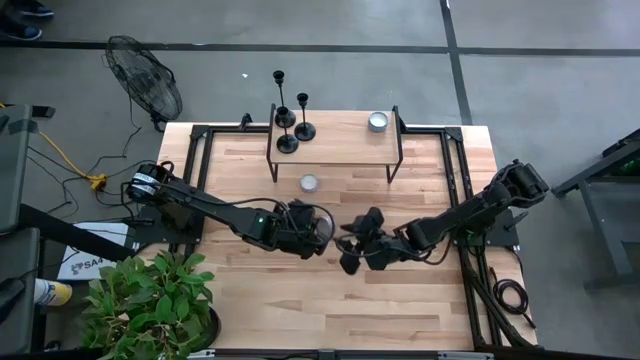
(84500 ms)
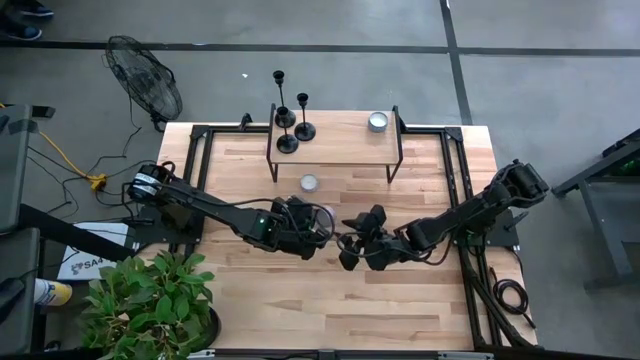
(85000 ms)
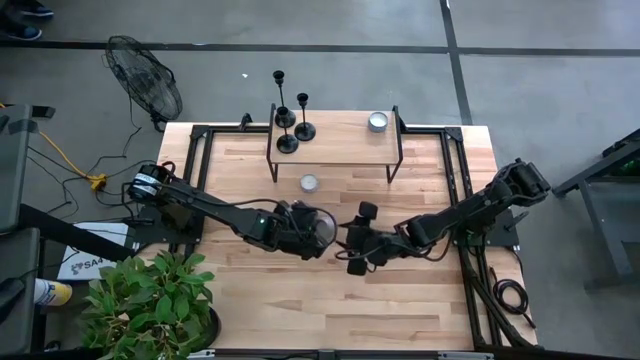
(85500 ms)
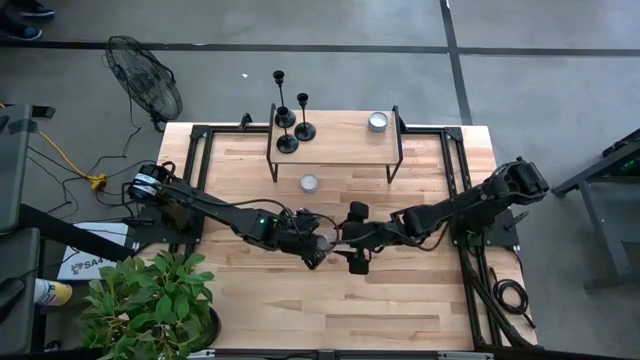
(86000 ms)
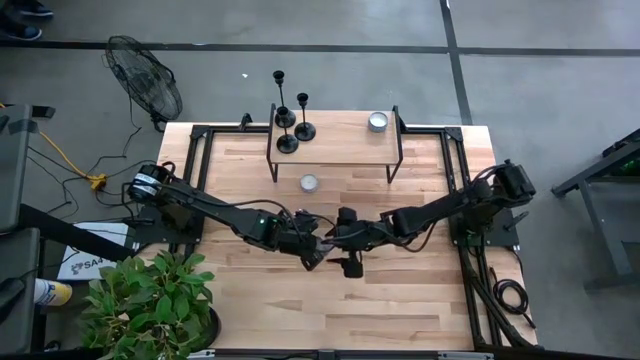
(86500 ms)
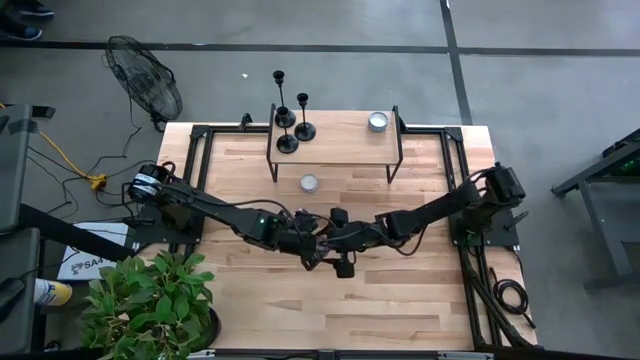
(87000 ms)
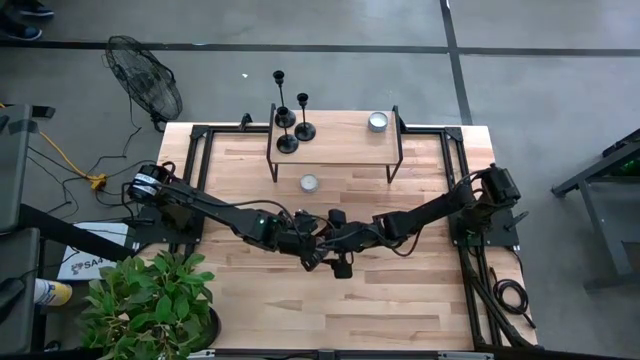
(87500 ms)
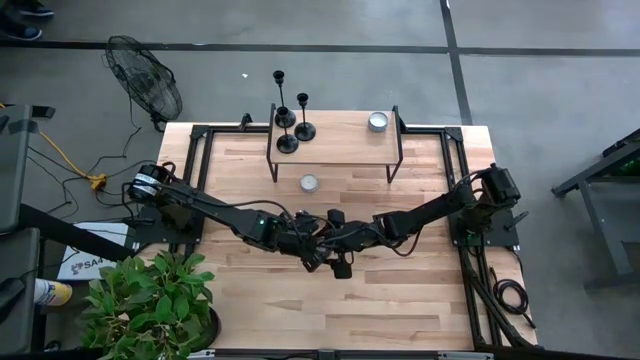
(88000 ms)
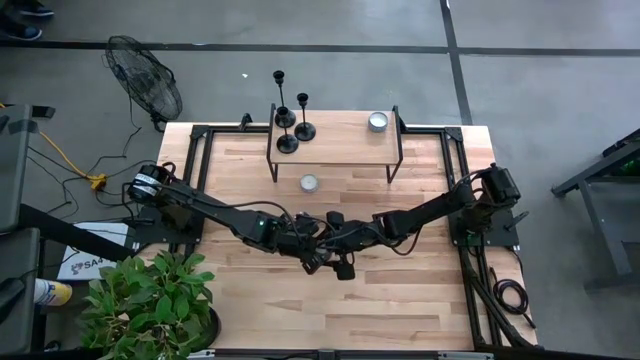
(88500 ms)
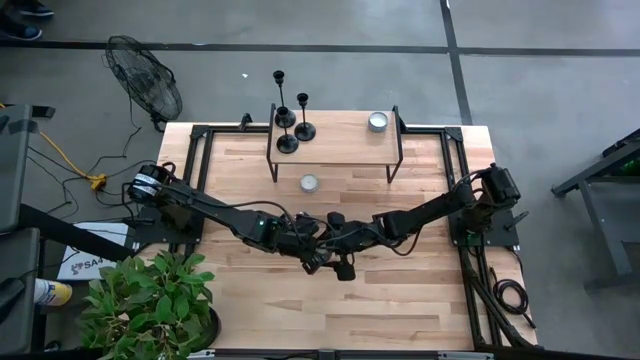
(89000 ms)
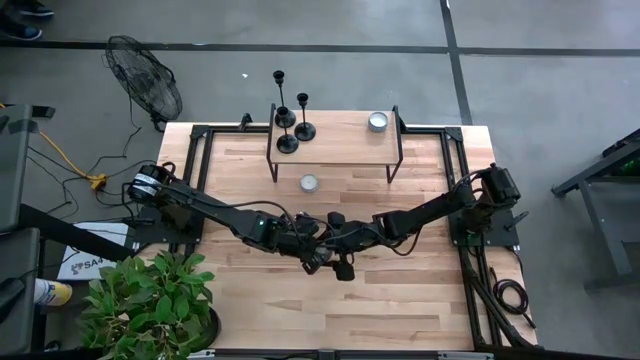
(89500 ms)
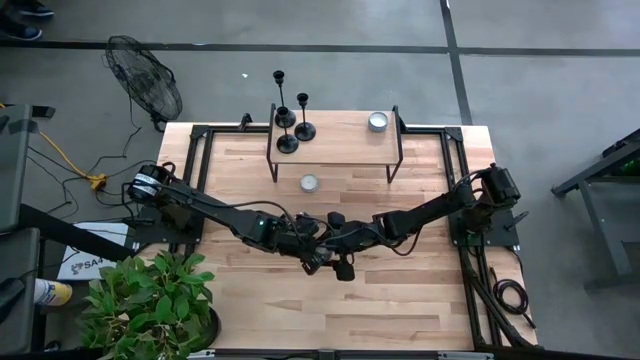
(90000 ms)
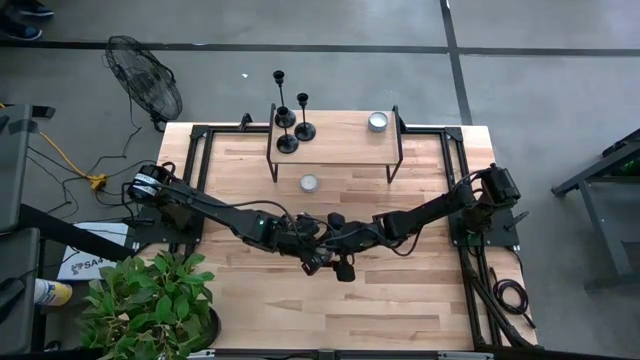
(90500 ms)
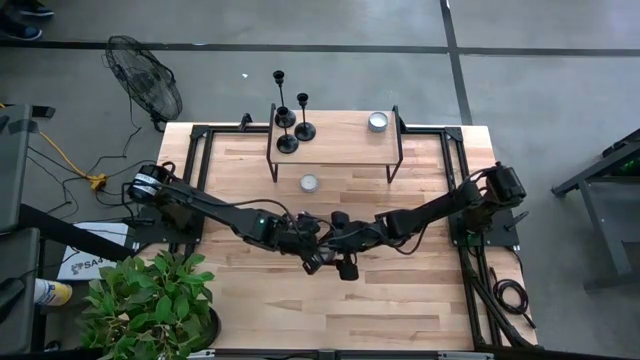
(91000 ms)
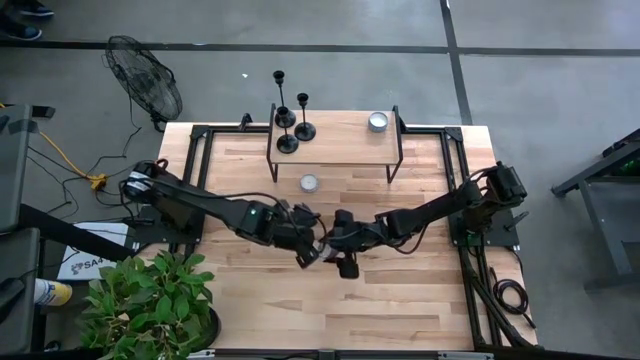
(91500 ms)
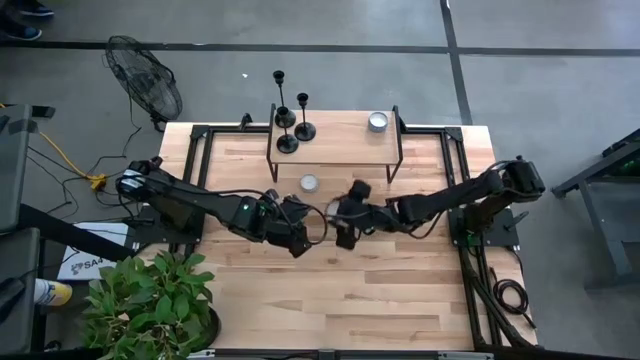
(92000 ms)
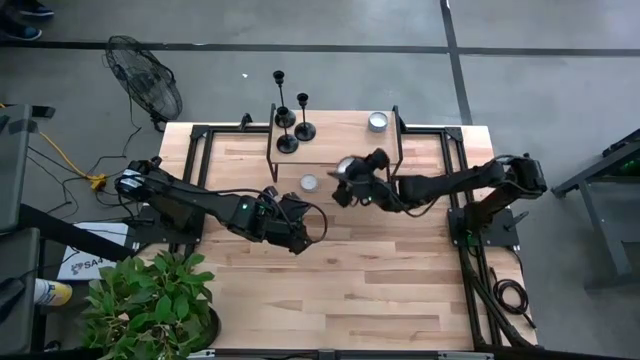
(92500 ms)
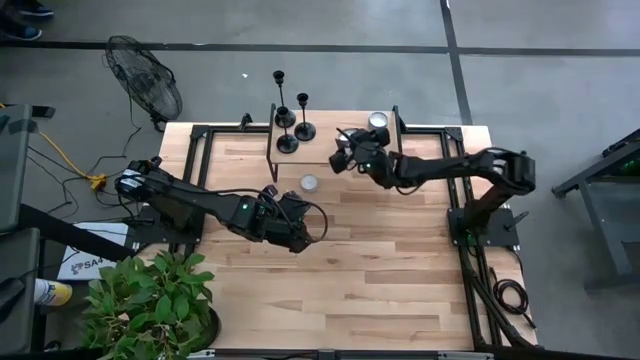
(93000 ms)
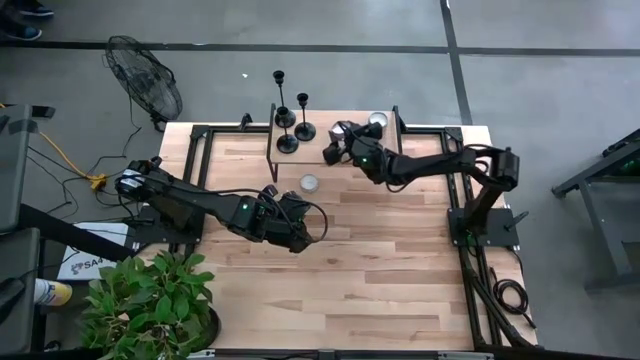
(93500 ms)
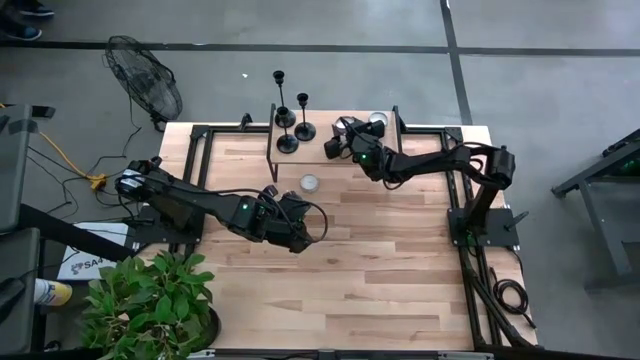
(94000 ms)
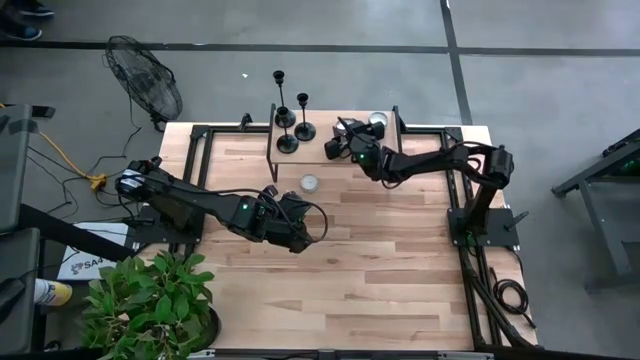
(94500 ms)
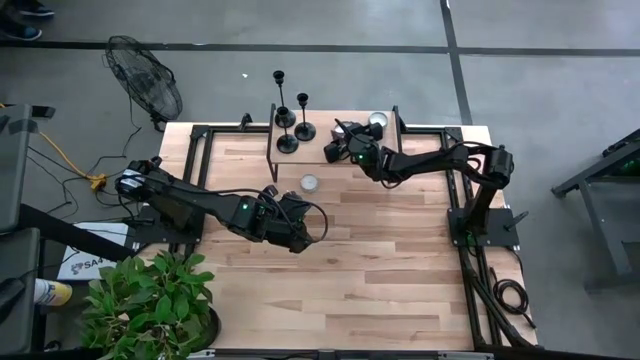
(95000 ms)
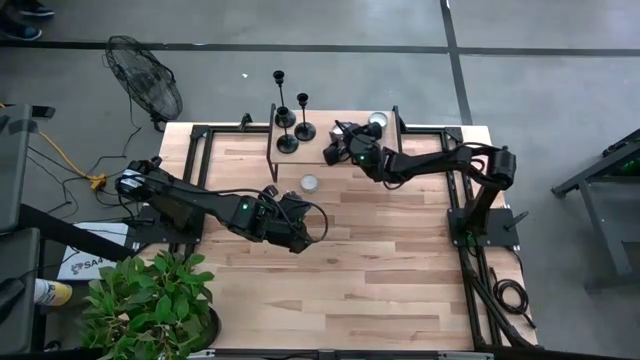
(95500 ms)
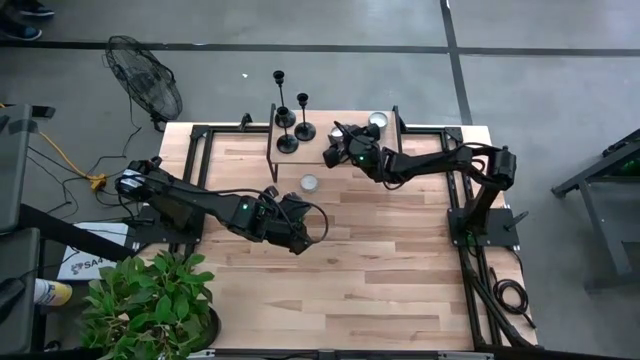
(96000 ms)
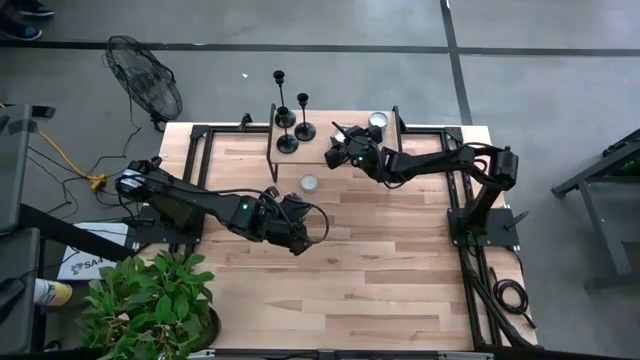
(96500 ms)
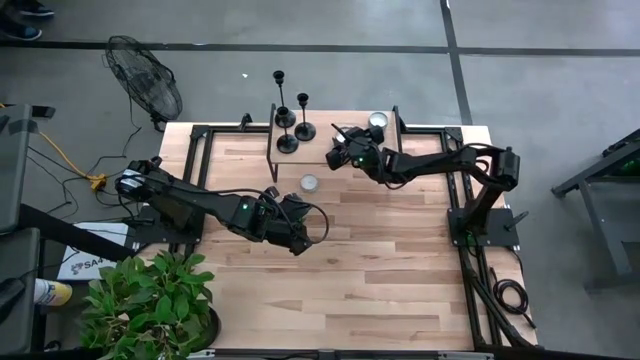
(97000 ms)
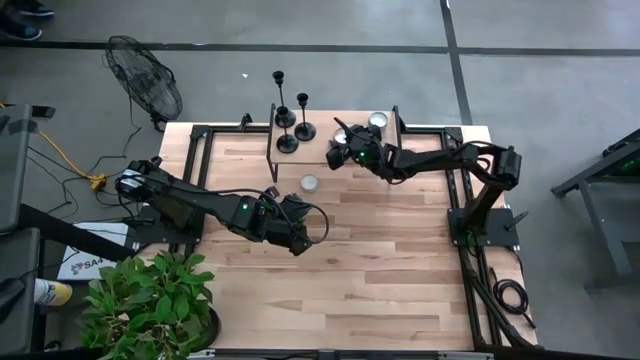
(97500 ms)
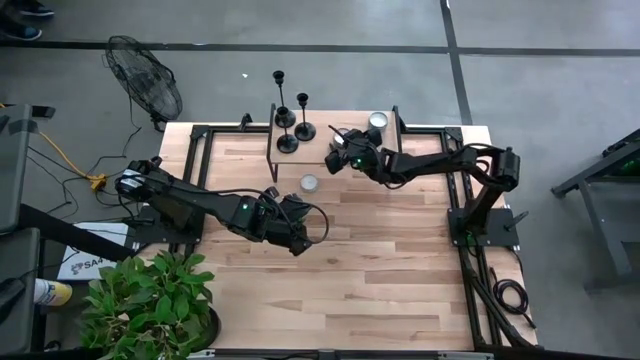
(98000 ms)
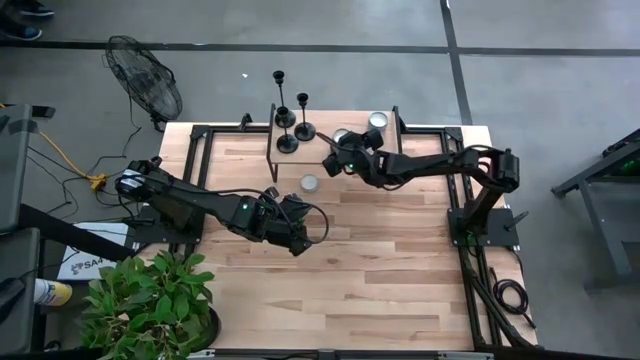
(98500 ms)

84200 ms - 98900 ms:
Task: Pick & Place candle stick holders
Put the pink scented candle on the shelf

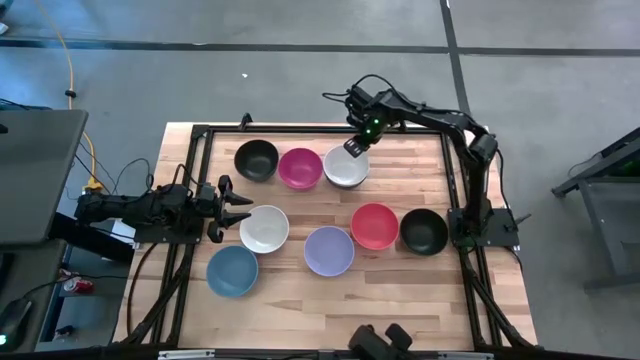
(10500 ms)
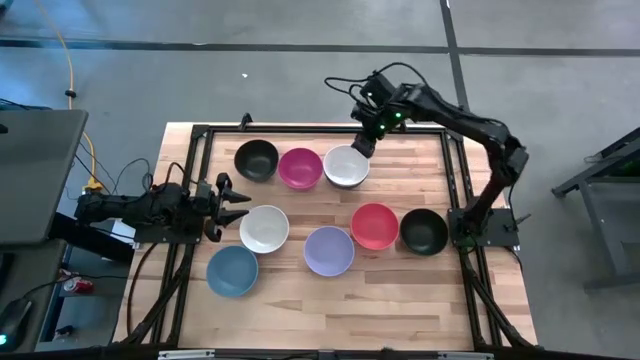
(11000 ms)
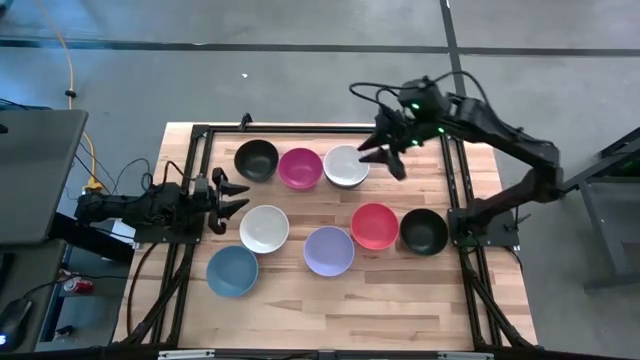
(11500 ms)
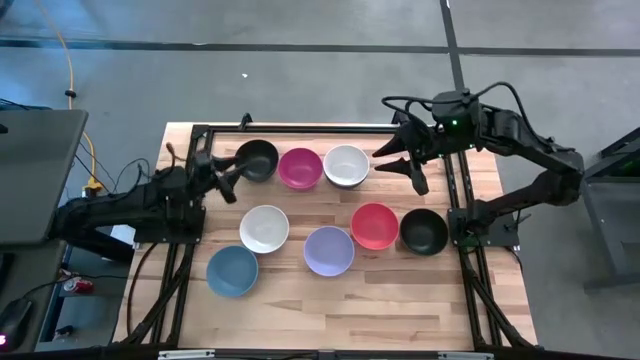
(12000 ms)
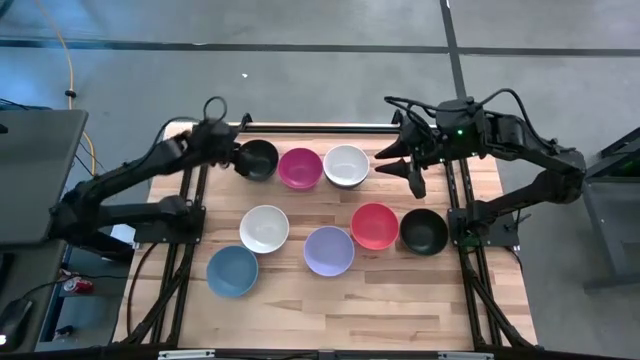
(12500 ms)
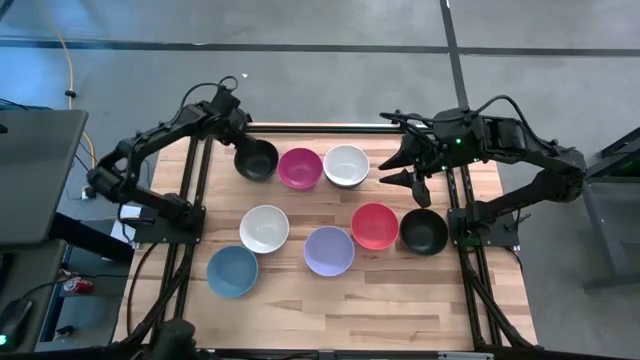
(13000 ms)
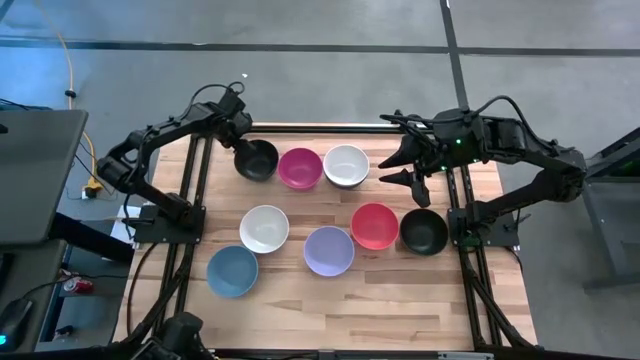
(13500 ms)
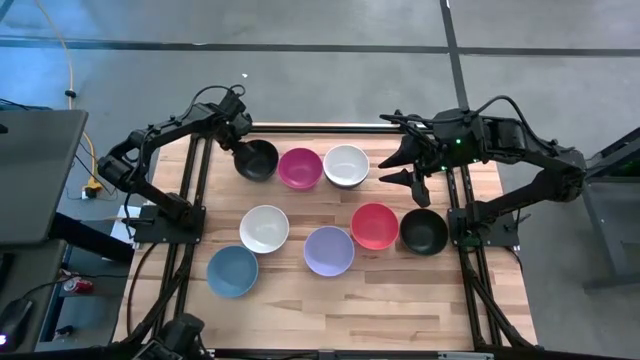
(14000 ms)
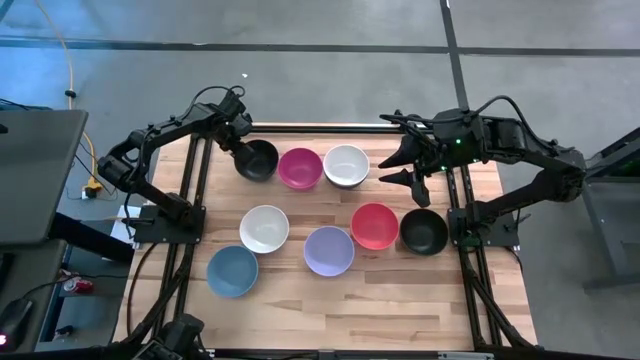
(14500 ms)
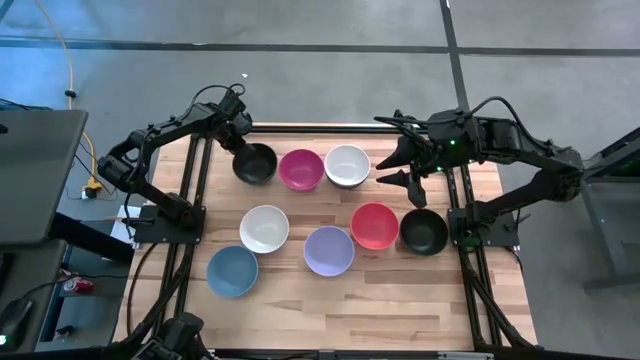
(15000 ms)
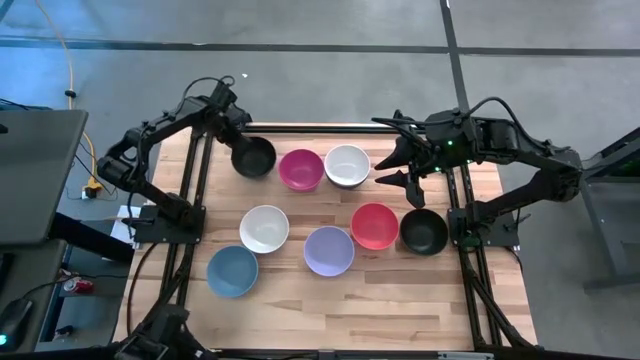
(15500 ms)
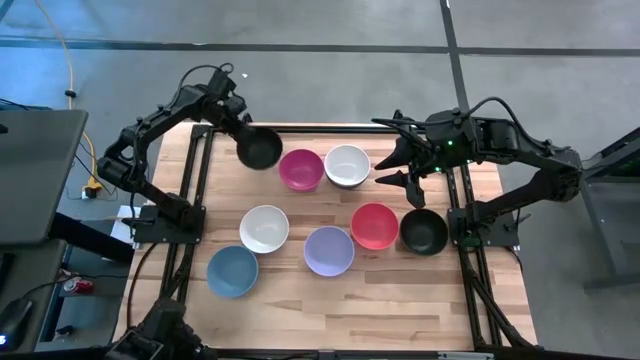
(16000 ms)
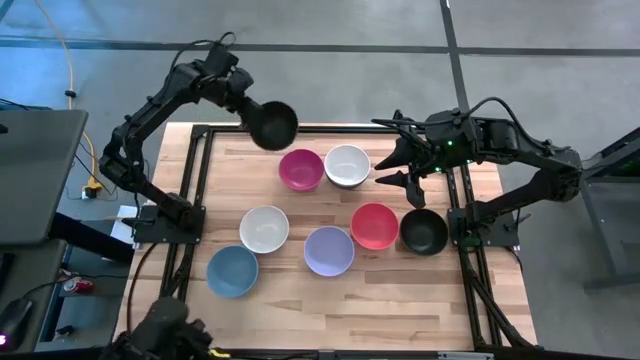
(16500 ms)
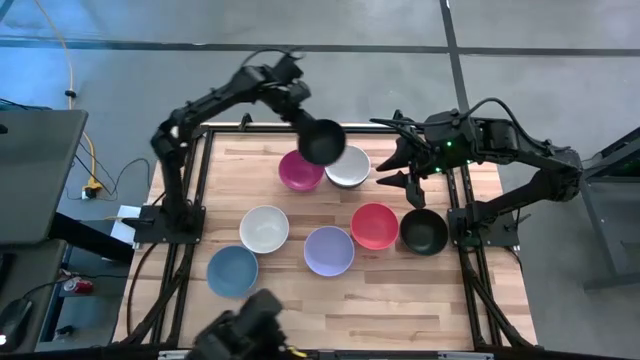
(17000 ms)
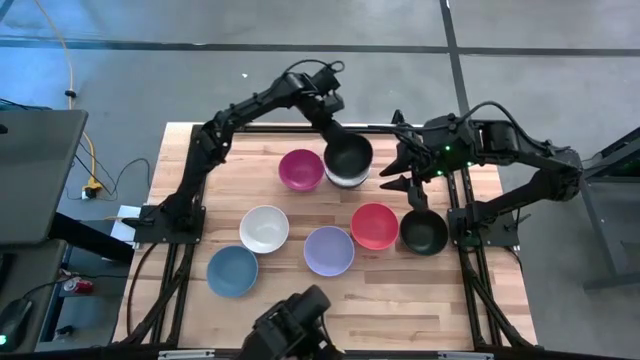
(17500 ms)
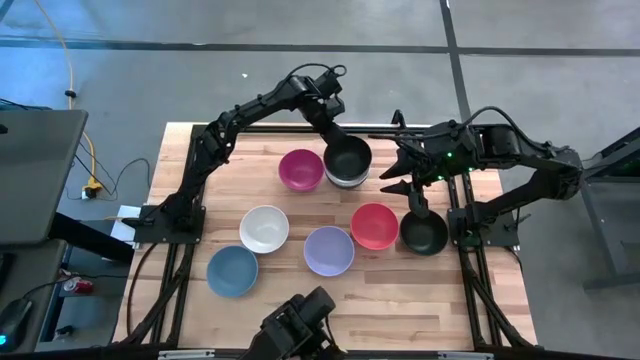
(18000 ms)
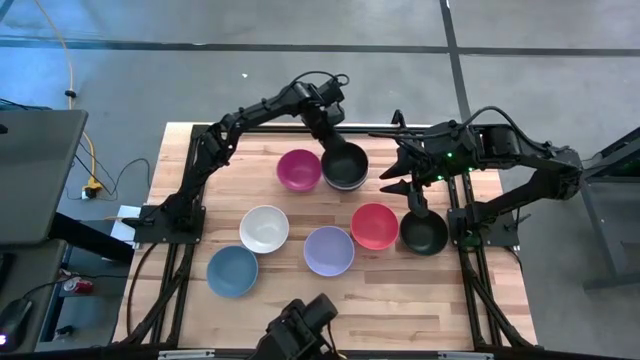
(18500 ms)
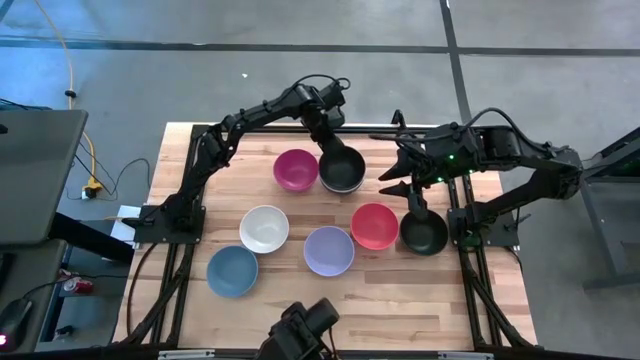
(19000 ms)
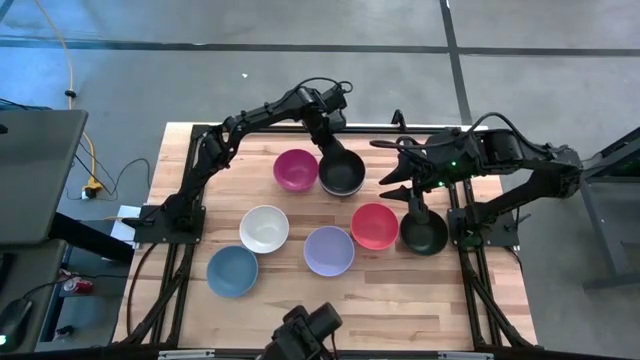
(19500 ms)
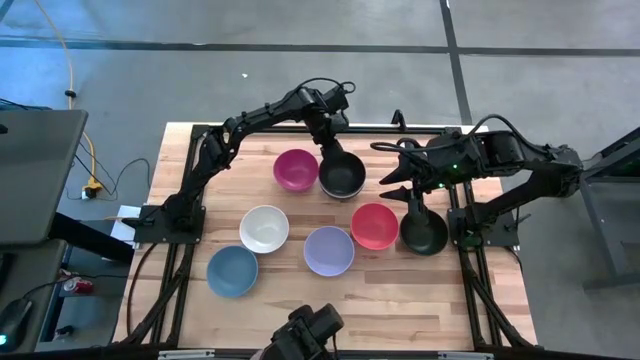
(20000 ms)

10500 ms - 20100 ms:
Task: Nest bowls inside each other
Stack the top black bowl on top of the white bowl
